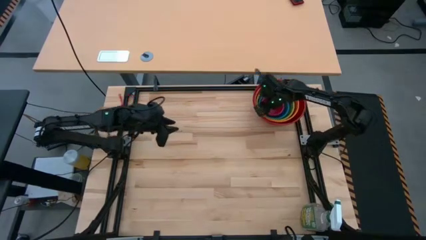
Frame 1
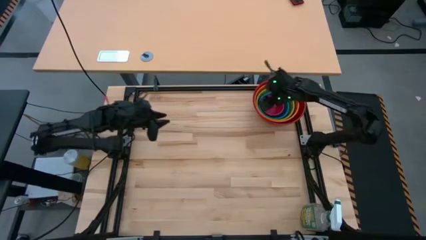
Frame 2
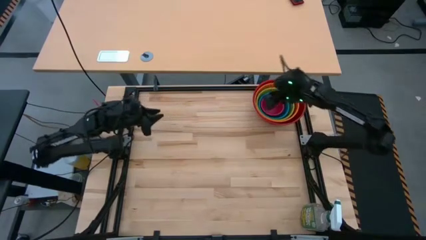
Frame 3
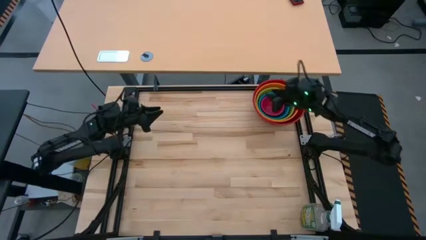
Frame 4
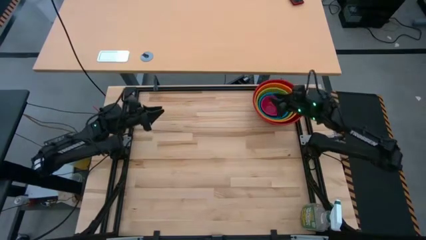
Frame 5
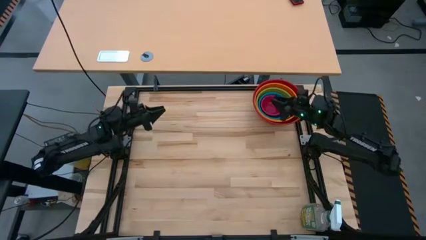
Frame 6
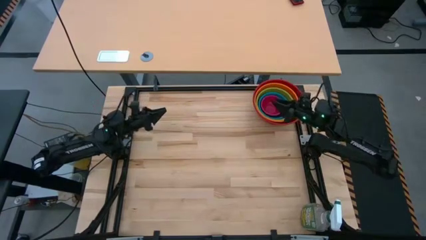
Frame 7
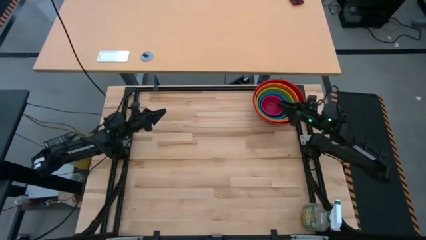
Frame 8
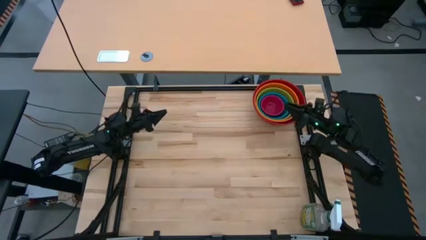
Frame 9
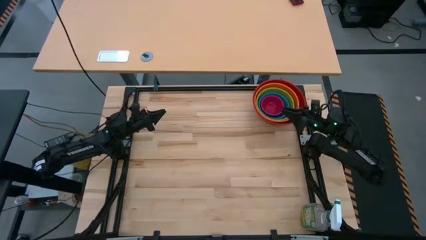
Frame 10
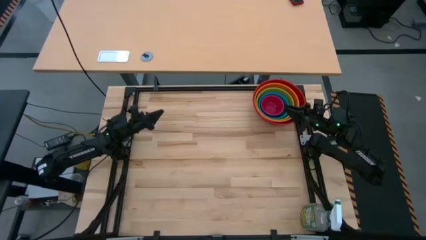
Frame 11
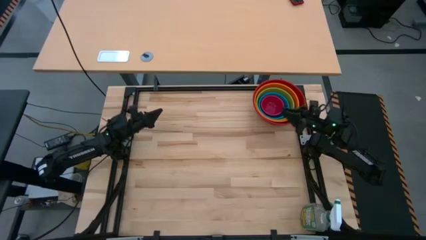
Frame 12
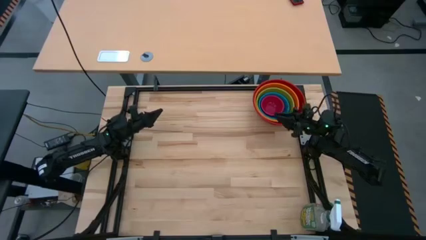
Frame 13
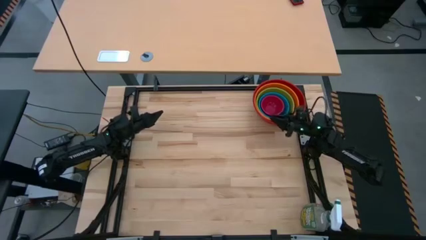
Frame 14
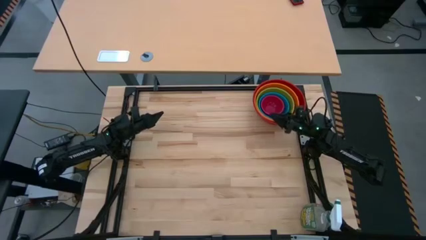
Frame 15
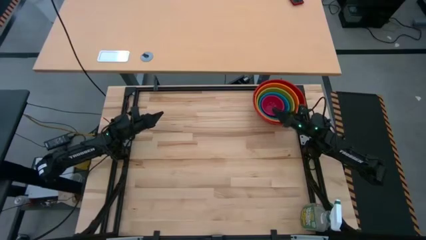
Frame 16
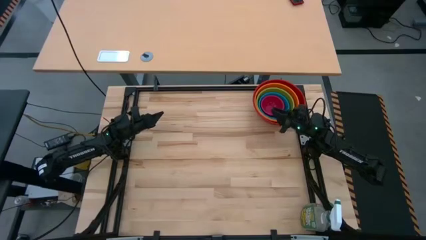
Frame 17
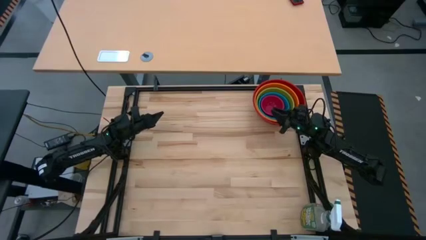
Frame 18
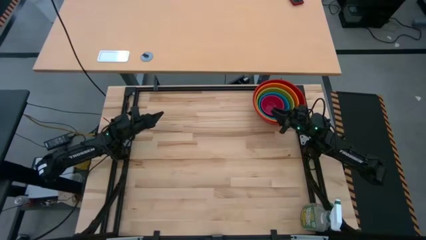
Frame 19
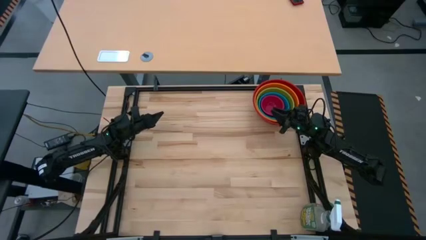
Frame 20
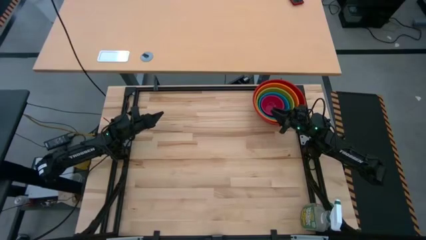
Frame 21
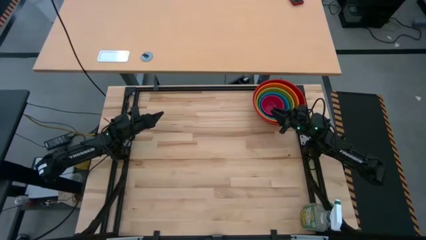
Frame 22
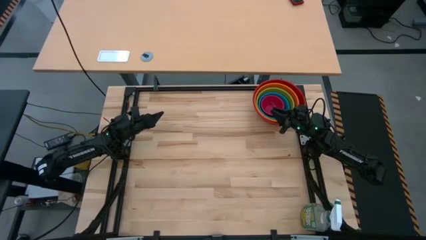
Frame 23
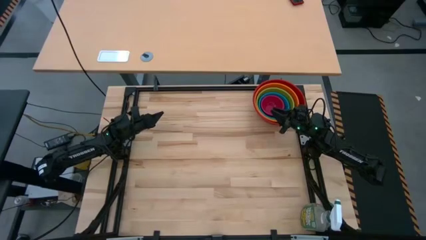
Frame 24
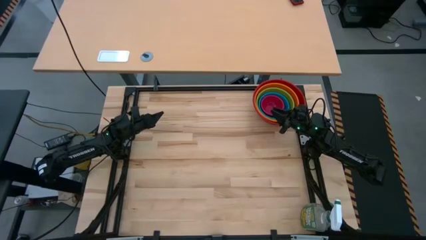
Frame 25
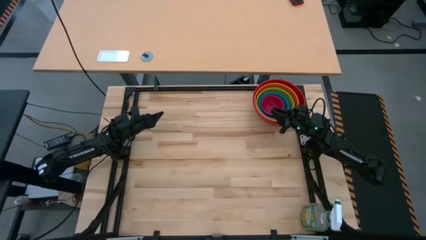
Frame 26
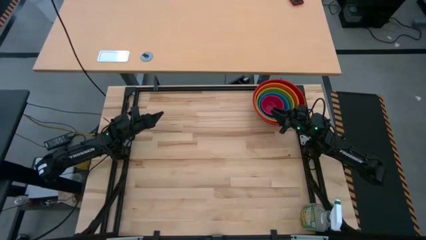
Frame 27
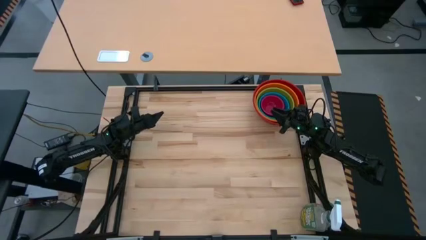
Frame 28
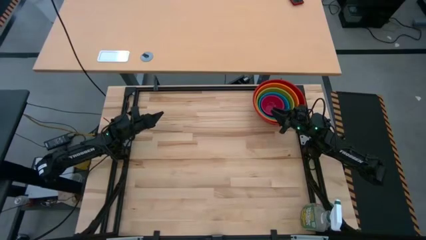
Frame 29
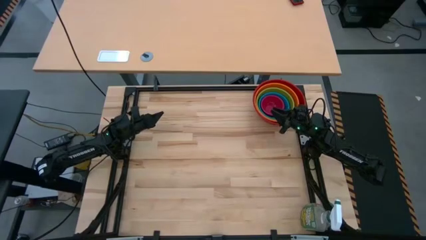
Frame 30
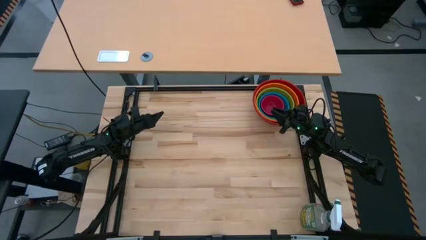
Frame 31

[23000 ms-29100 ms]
Return to Home Position
